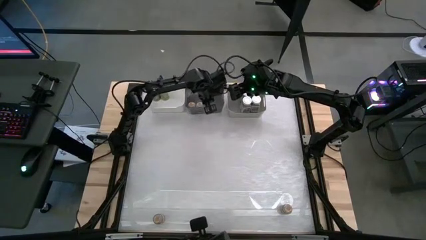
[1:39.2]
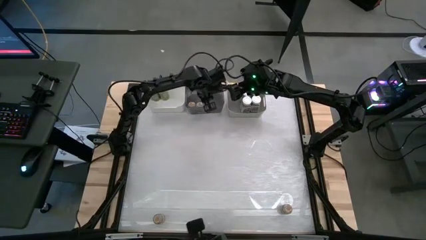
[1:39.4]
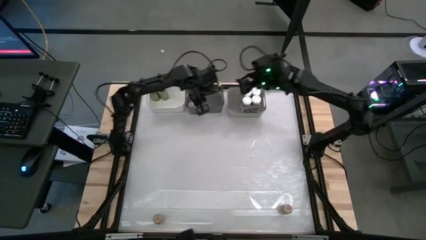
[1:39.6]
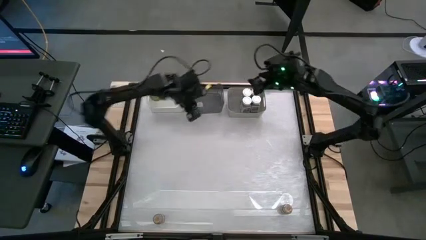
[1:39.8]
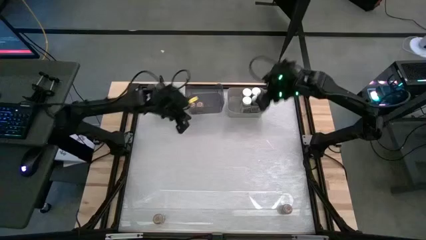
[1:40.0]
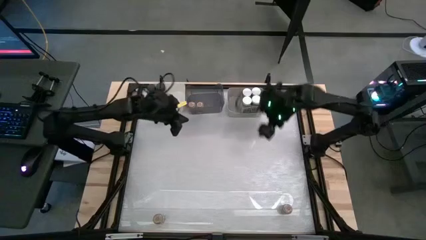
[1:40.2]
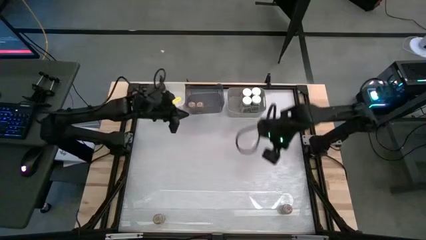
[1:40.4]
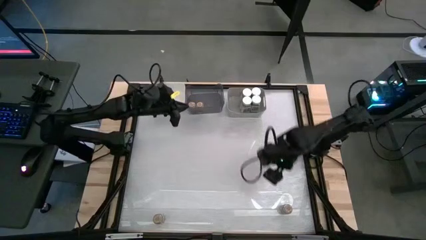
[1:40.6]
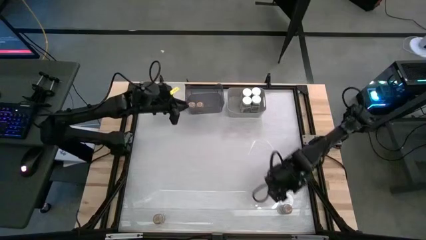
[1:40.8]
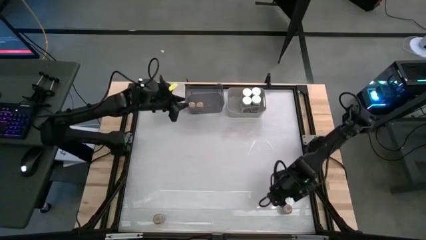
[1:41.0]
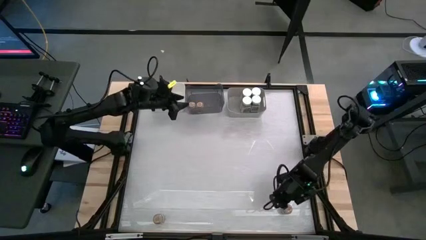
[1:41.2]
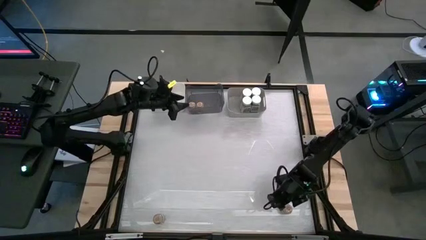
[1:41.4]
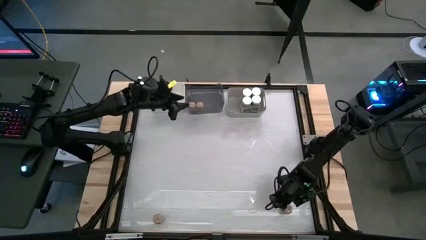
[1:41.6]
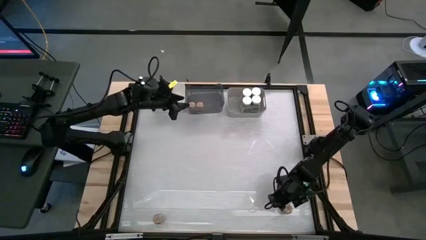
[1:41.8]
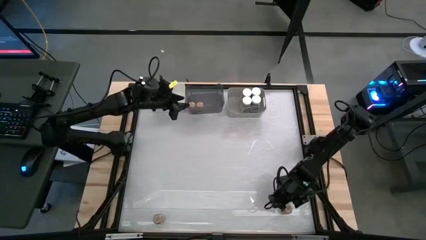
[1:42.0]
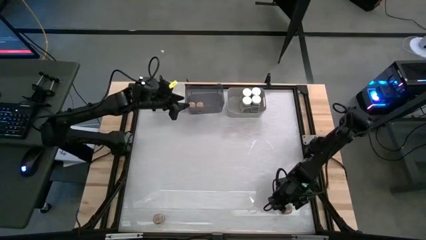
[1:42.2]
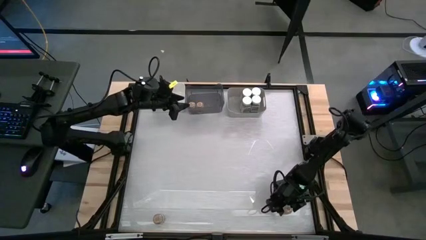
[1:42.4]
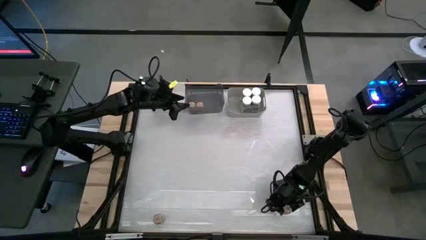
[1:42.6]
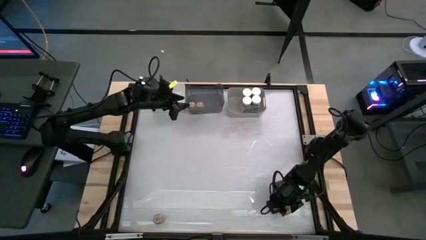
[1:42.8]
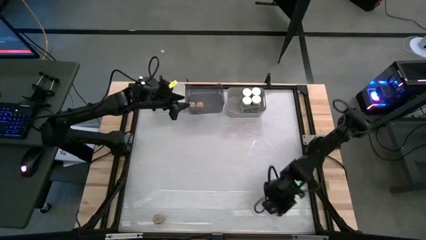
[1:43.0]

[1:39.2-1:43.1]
Task: Sort spices by type
Put the right brown seasoning bottle into the black bin

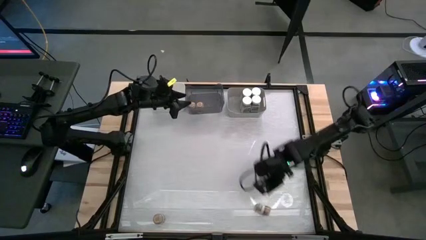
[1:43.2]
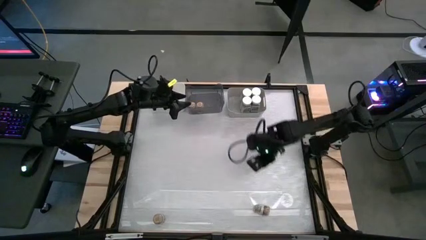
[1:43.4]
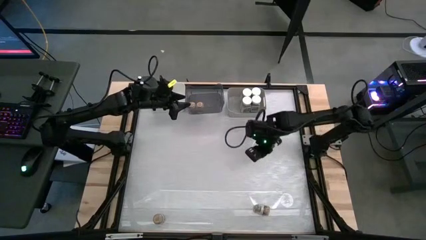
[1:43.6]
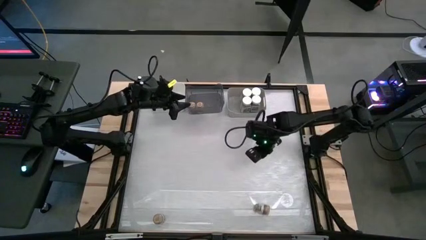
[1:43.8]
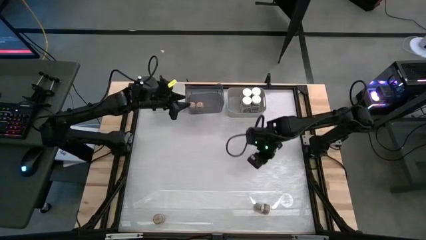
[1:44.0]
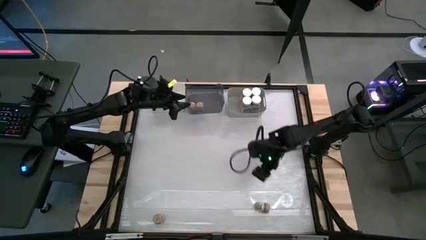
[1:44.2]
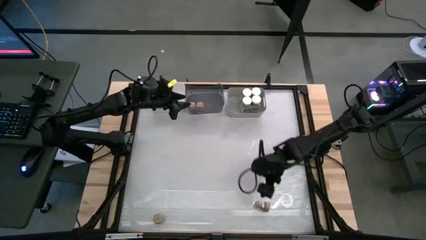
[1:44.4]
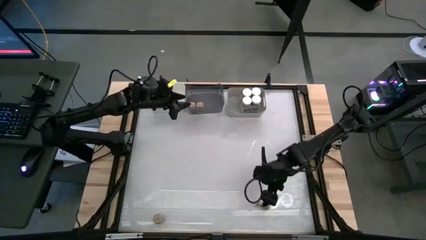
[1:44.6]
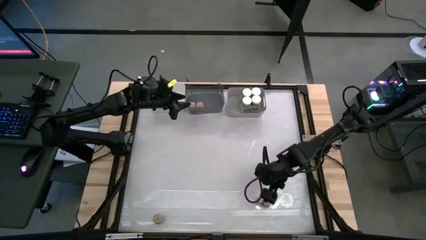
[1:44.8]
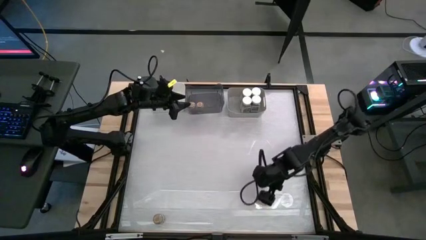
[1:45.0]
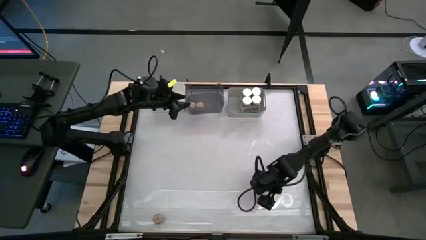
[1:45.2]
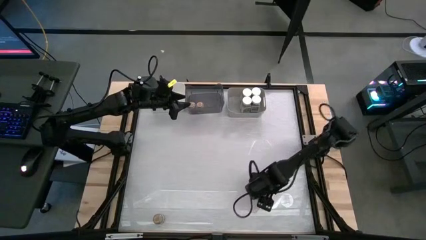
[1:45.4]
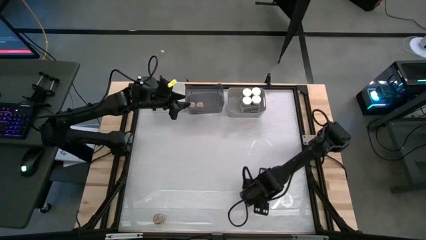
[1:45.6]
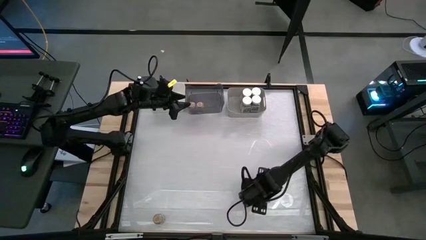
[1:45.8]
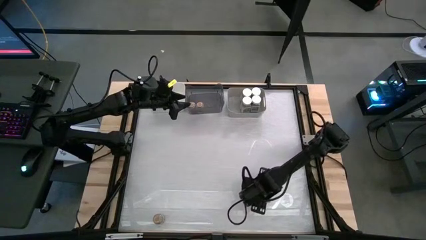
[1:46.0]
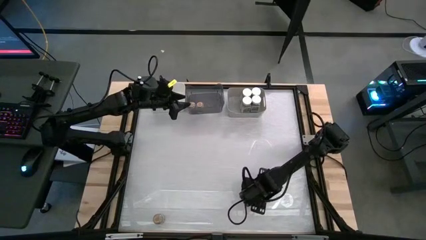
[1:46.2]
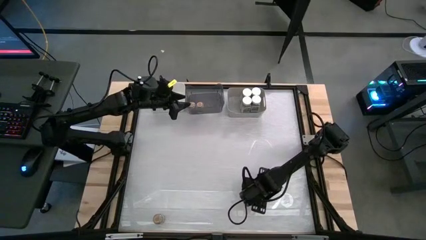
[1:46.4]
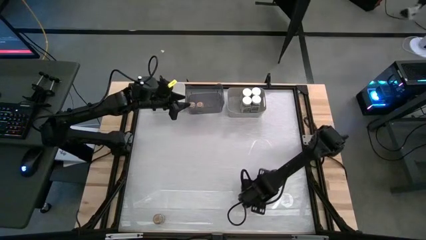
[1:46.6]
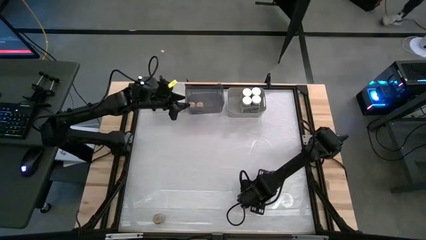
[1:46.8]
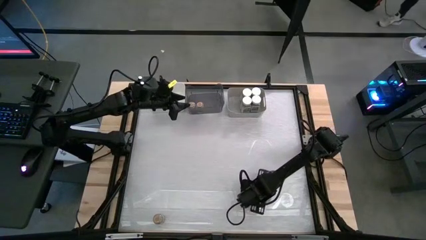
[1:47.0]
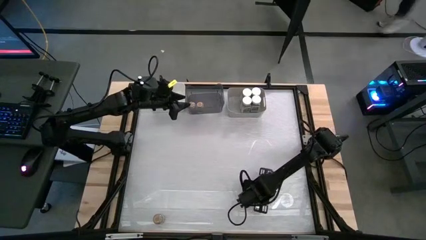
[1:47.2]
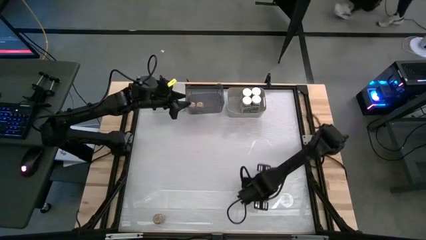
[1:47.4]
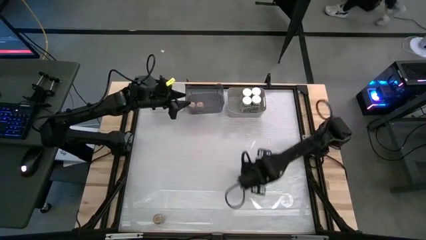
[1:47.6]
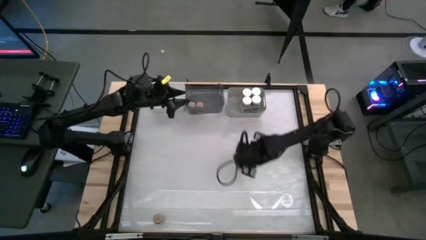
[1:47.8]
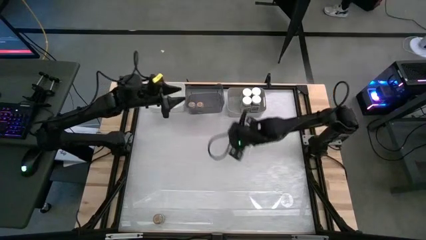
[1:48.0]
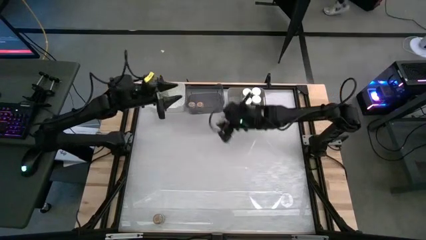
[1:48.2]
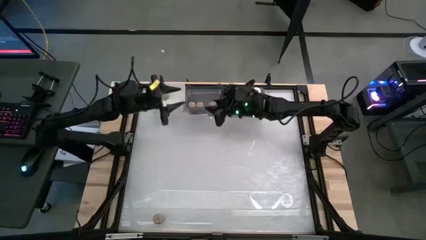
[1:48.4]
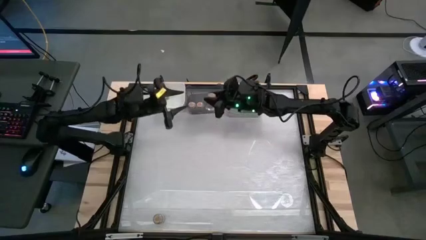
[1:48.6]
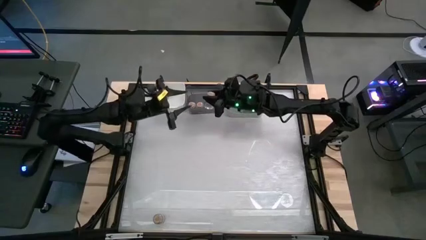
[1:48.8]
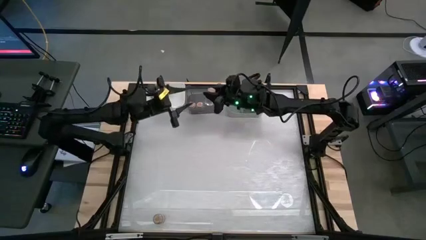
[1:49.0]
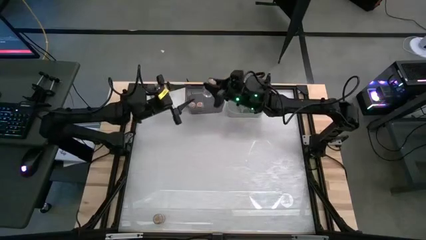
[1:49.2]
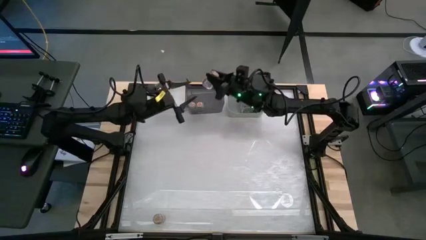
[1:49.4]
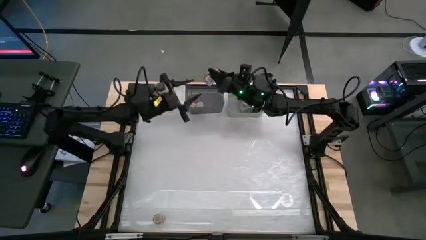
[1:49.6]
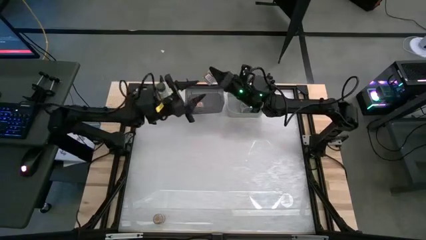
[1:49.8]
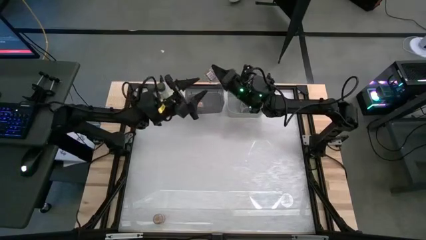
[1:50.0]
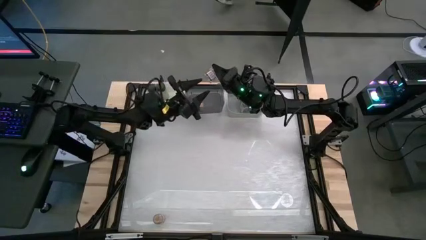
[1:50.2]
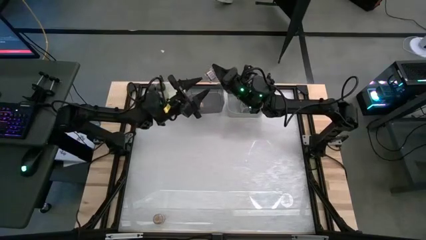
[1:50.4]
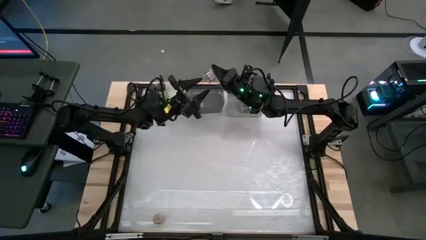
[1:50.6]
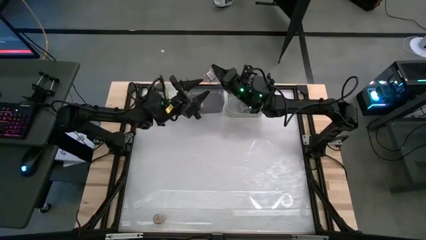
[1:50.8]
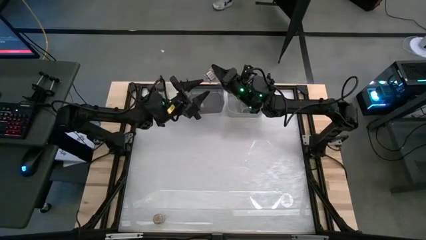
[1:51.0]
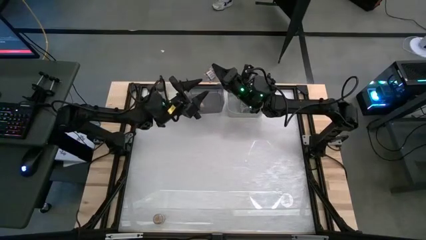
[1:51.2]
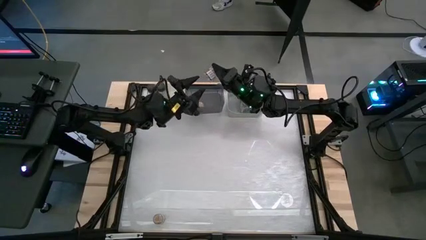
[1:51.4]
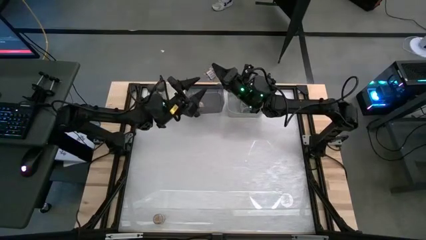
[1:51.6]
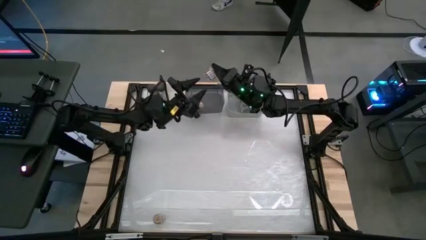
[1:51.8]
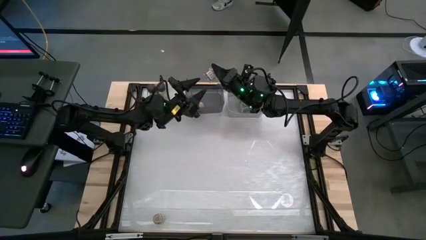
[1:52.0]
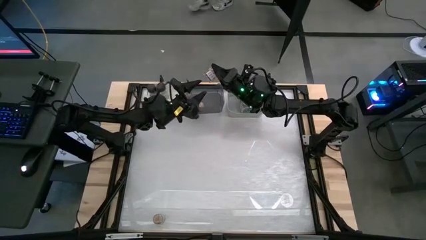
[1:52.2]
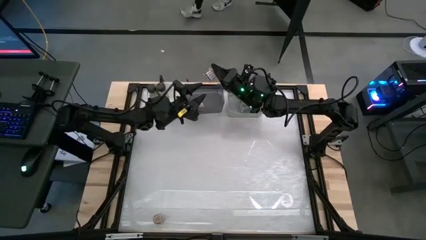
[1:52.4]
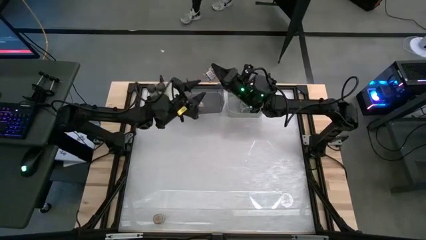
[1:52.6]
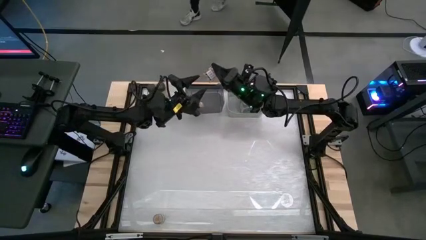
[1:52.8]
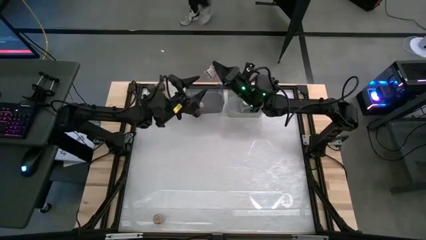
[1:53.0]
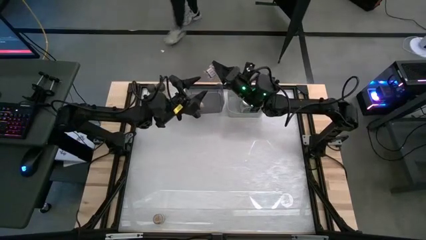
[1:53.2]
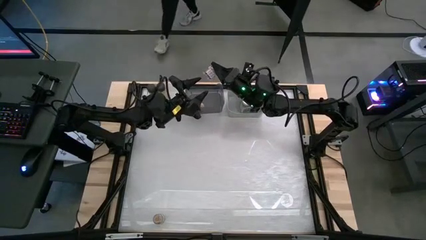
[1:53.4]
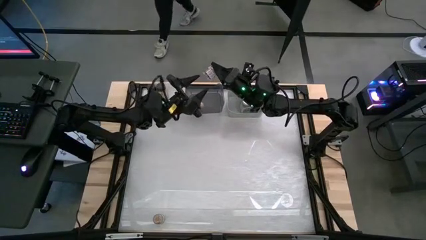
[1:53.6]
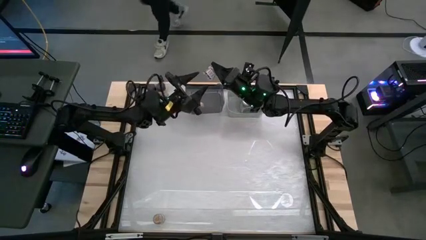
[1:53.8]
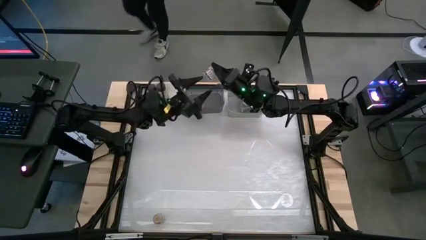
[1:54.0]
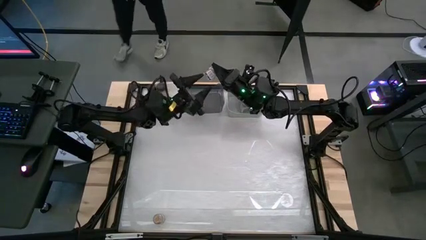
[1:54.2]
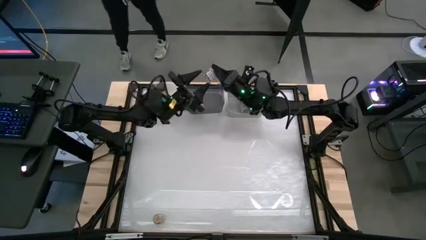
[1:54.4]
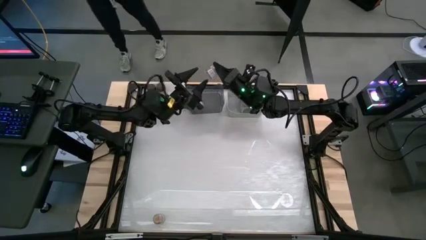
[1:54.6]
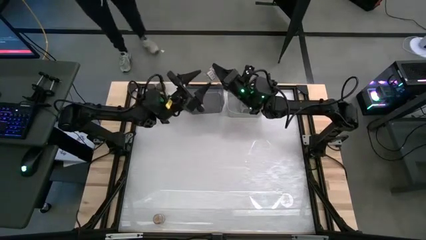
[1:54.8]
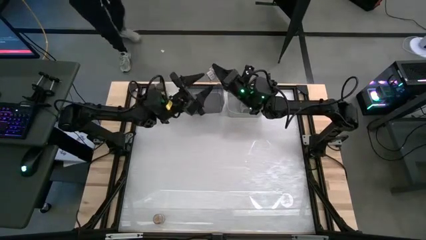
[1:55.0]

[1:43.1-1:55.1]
Put the right brown seasoning bottle into the black bin
